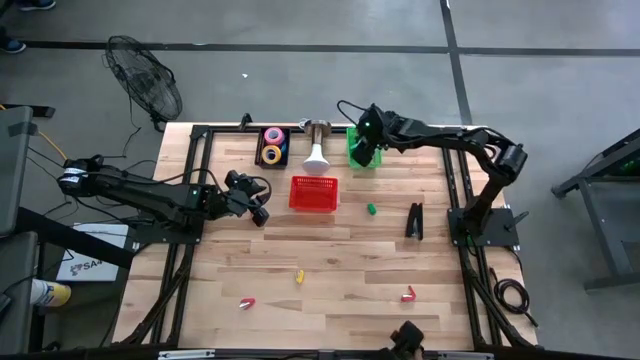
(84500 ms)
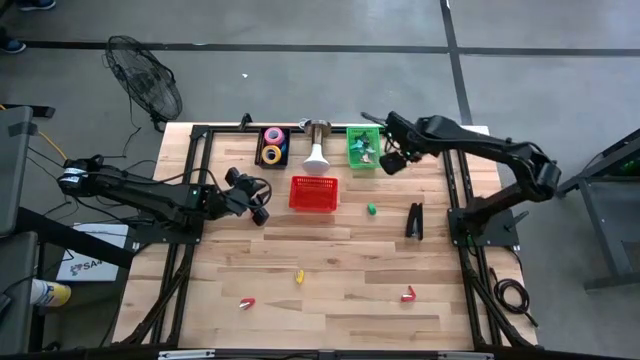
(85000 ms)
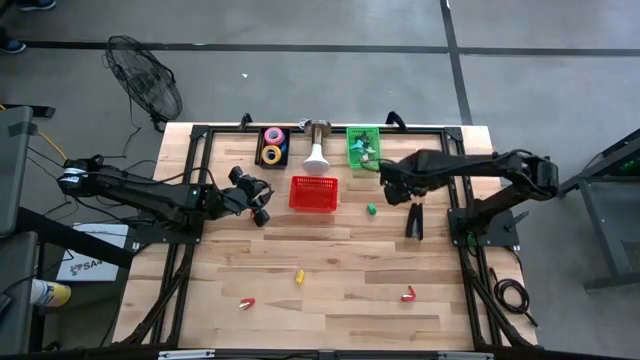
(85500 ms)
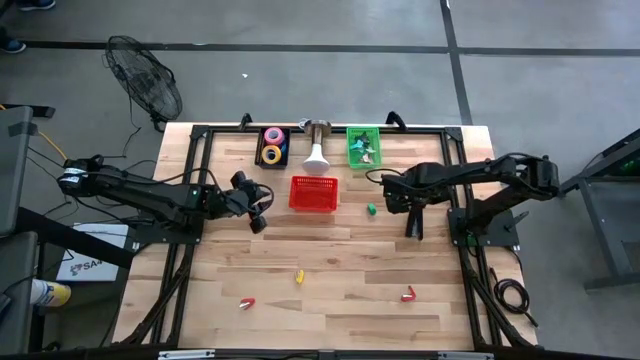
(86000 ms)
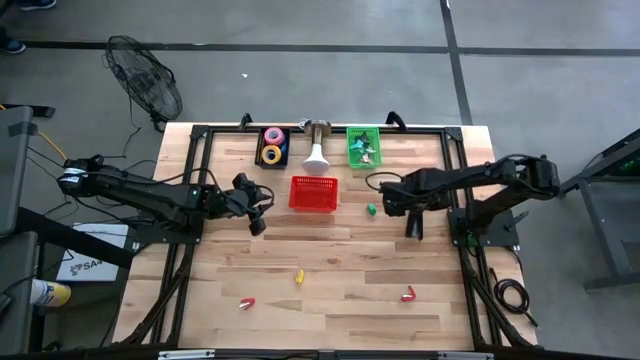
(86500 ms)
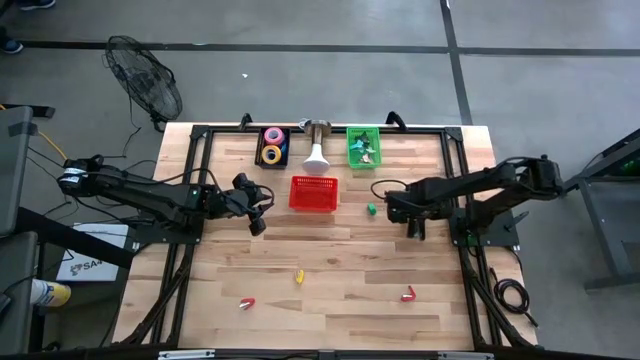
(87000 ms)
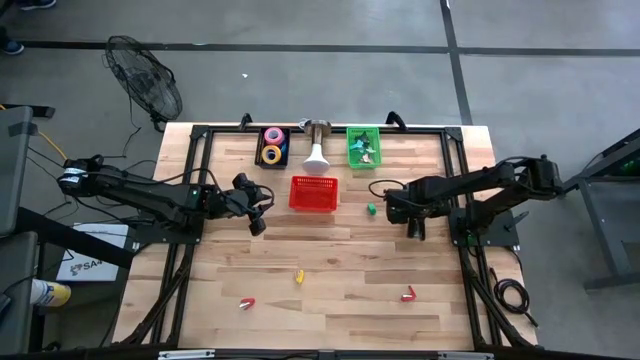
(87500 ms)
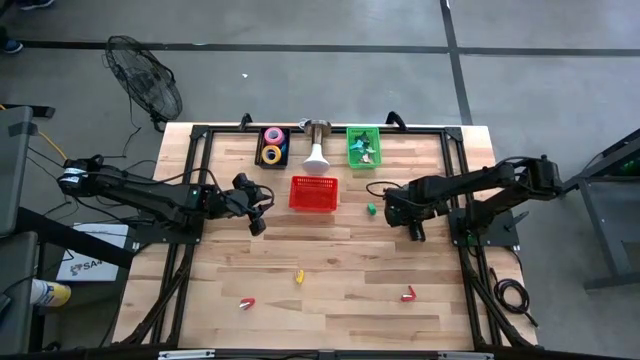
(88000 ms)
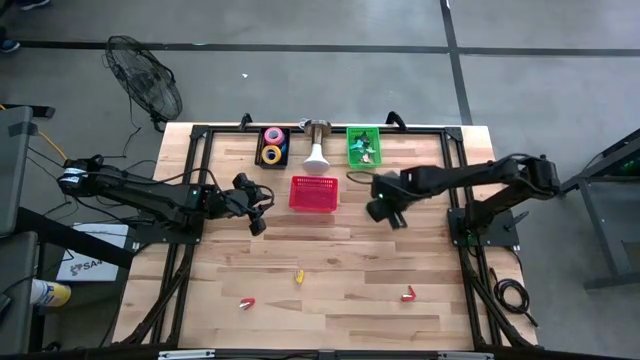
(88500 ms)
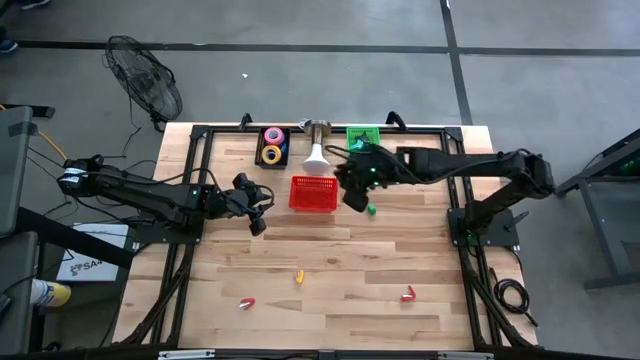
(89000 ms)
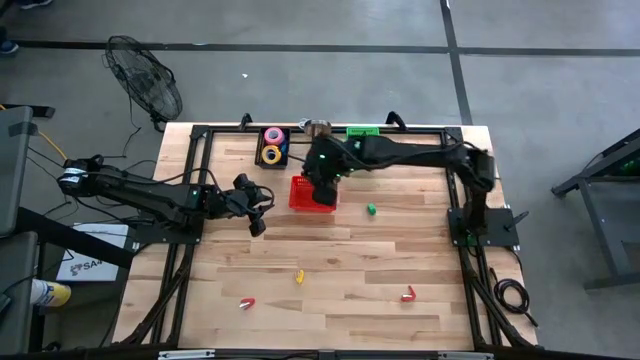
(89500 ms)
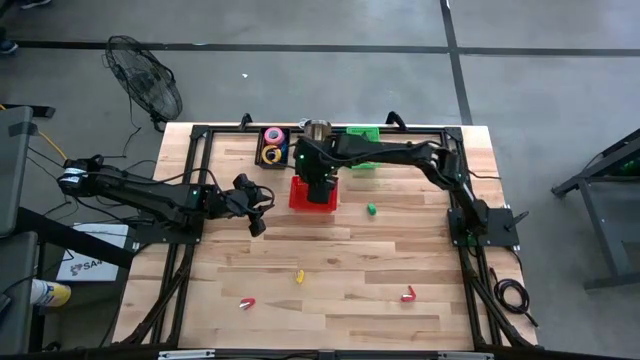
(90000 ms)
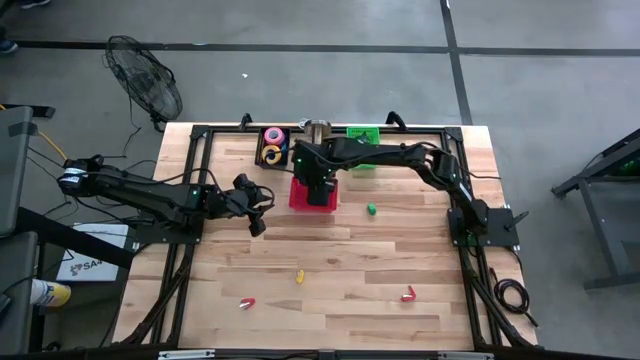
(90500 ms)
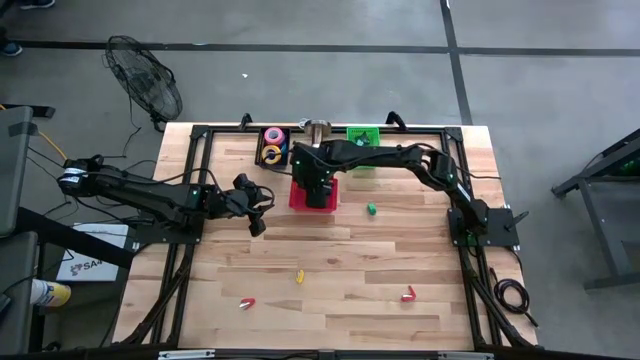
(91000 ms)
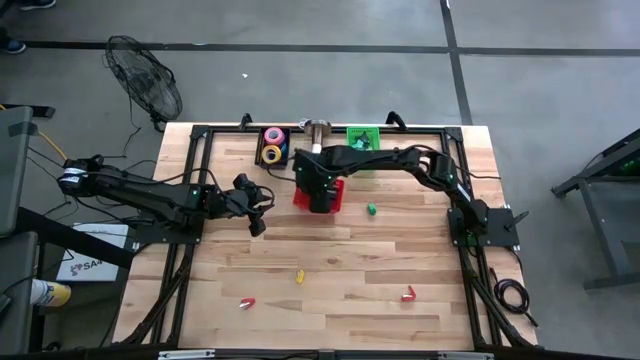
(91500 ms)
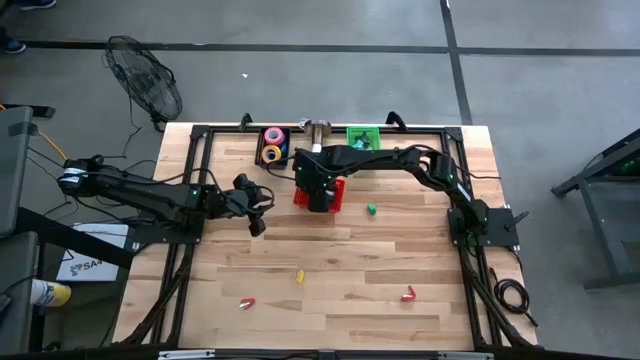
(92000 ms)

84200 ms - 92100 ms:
Task: Pick and place Stapler, Stapler remover, tape
Put the black stapler into the red basket

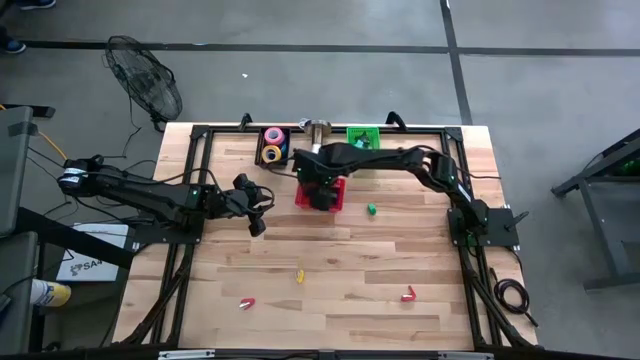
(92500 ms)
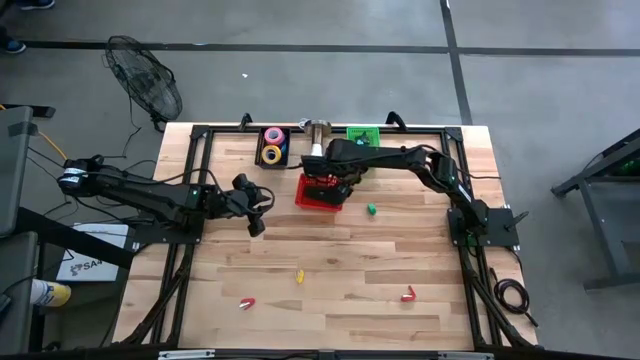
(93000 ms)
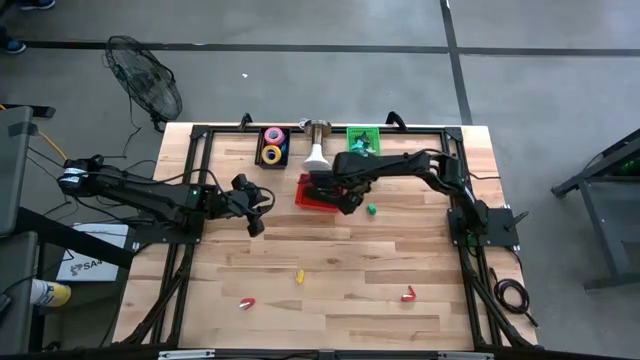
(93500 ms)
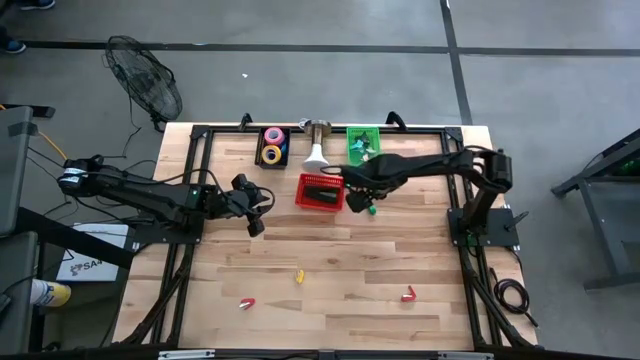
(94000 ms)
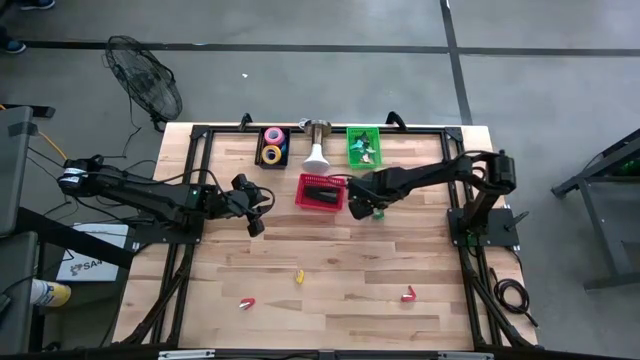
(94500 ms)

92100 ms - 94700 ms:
Put the green stapler into the red basket

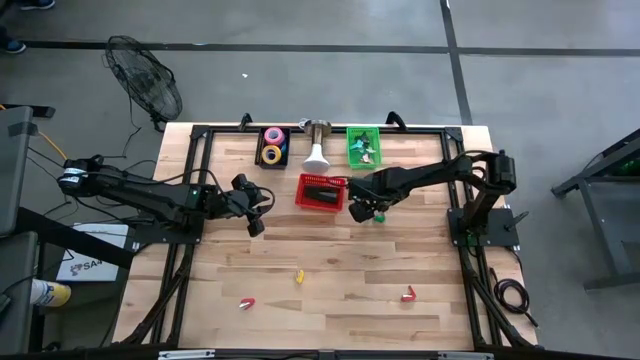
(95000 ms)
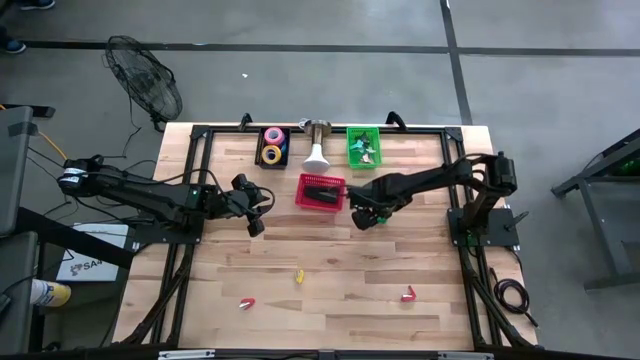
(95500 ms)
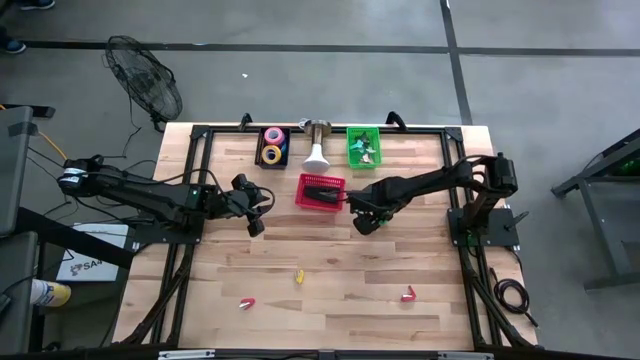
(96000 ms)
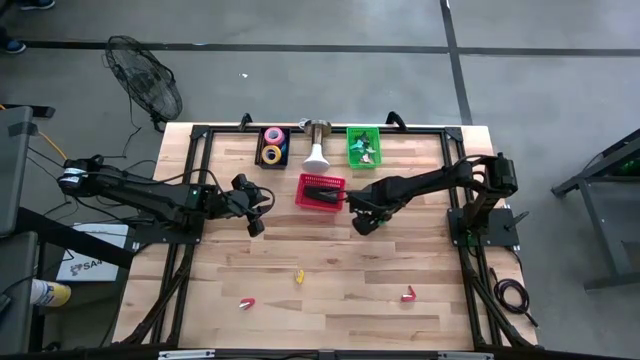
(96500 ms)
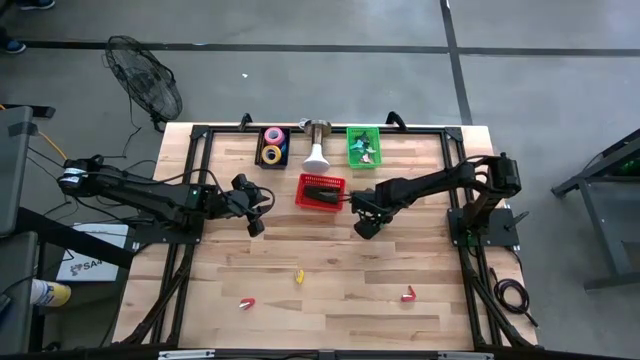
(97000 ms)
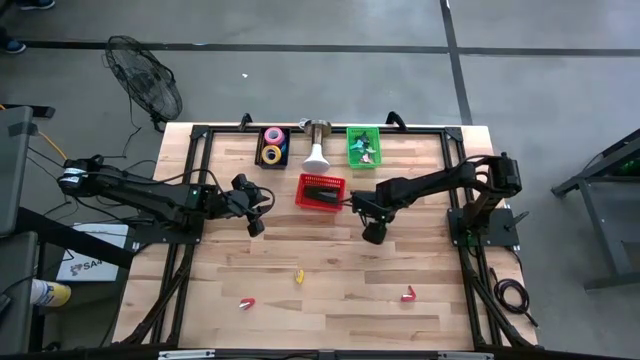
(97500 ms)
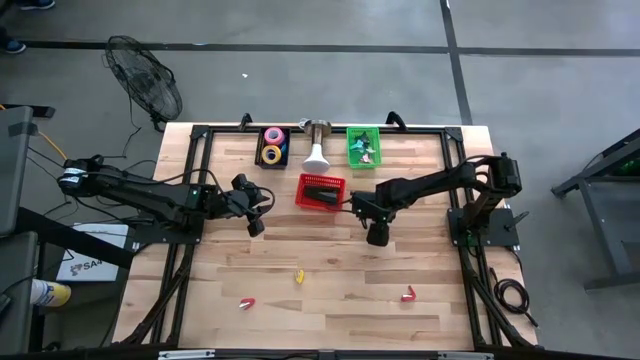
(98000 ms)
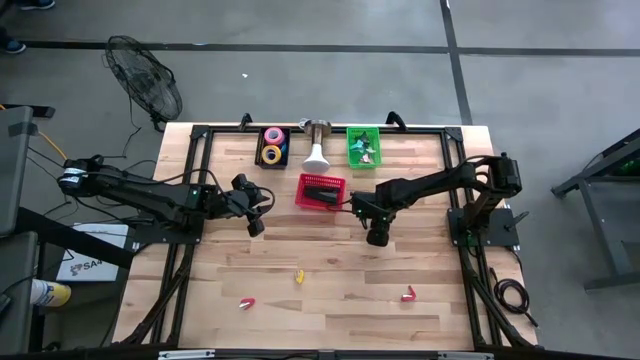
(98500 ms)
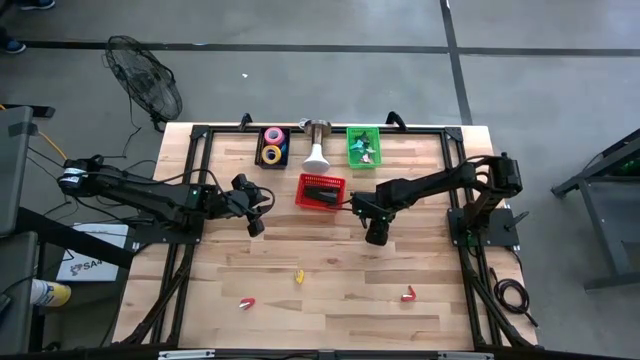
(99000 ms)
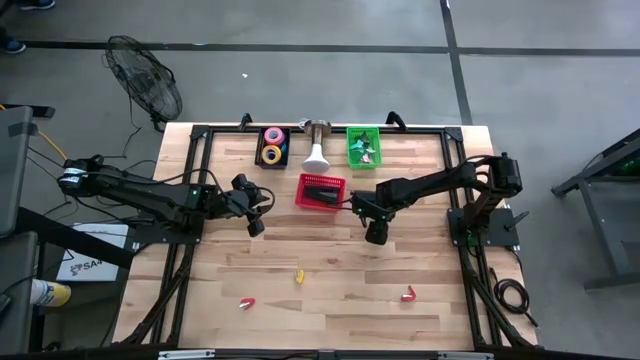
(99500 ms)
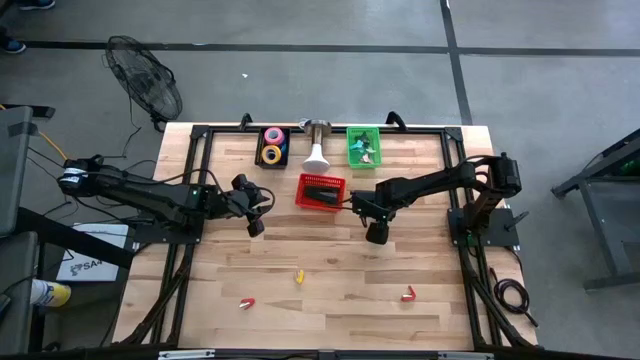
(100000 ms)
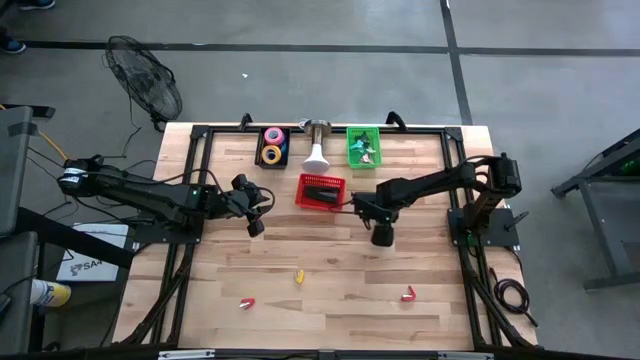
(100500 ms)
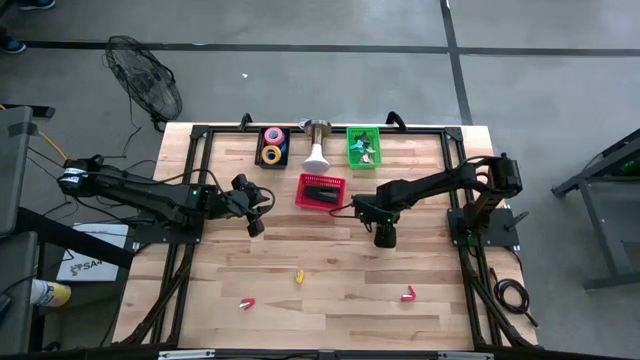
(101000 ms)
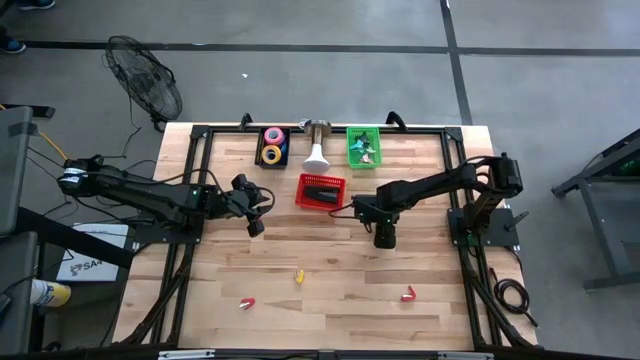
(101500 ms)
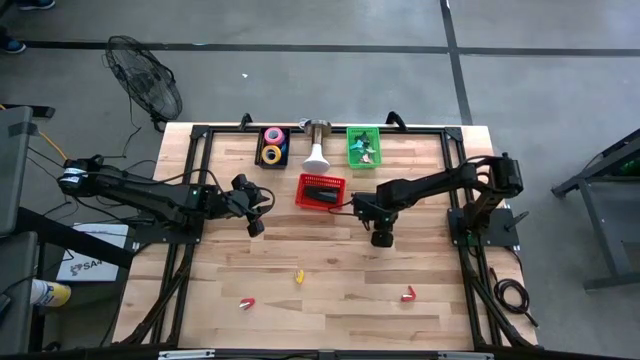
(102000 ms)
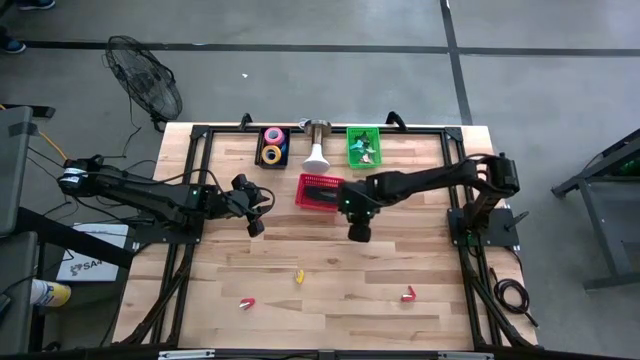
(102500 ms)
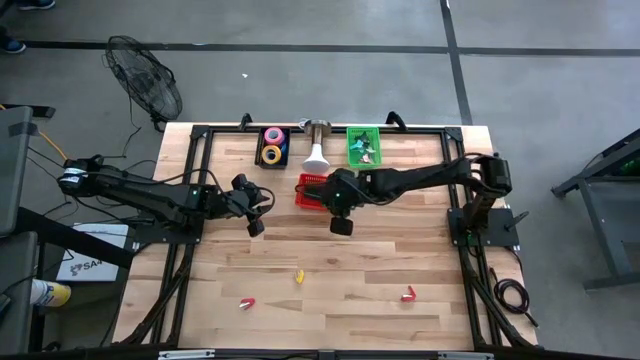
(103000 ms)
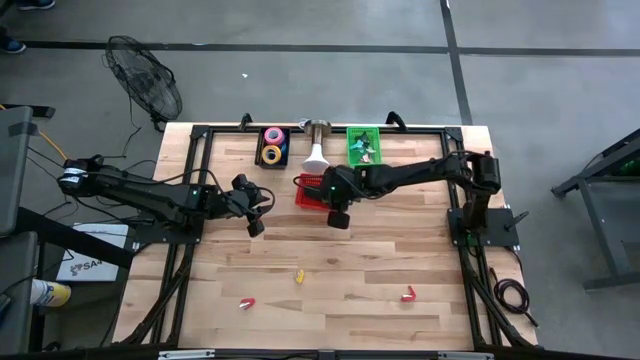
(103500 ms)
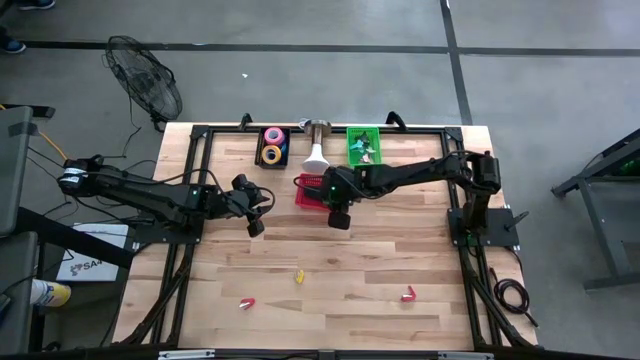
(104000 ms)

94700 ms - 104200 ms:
Put the green stapler into the red basket

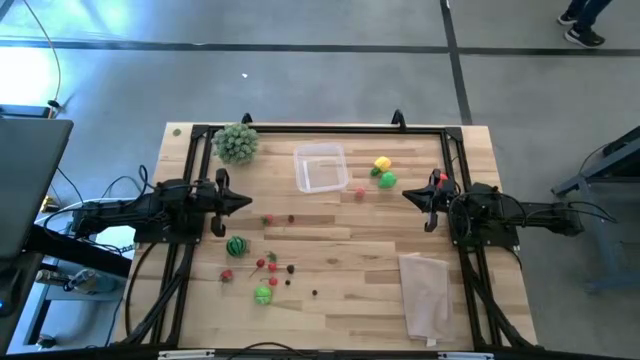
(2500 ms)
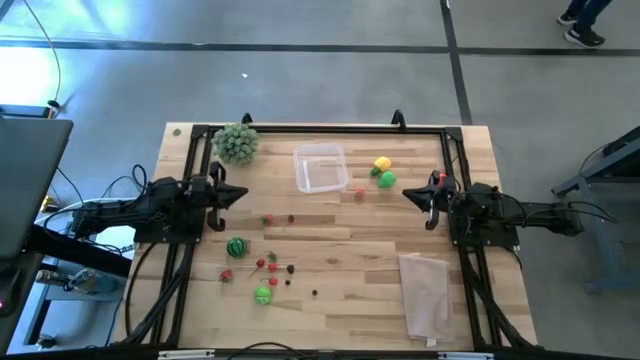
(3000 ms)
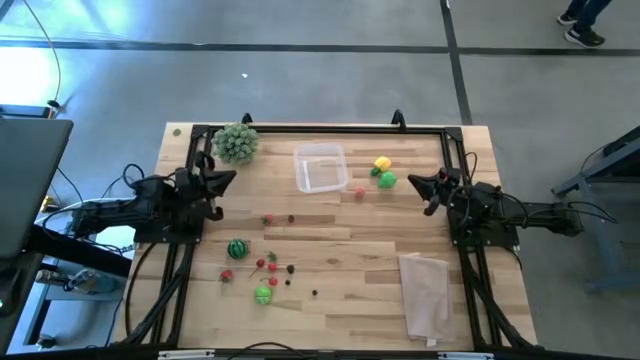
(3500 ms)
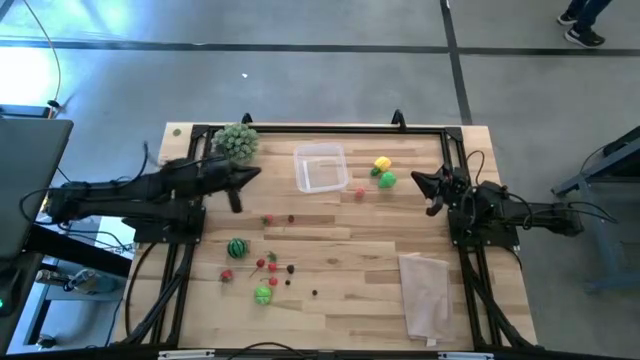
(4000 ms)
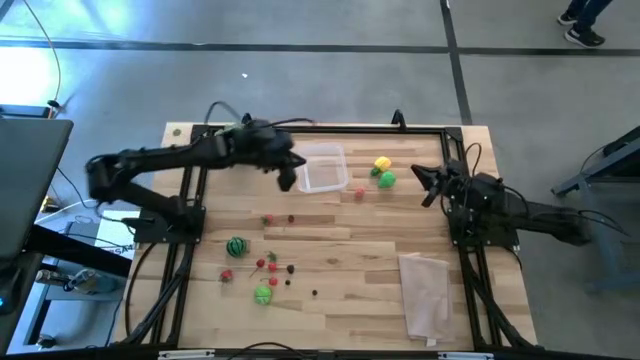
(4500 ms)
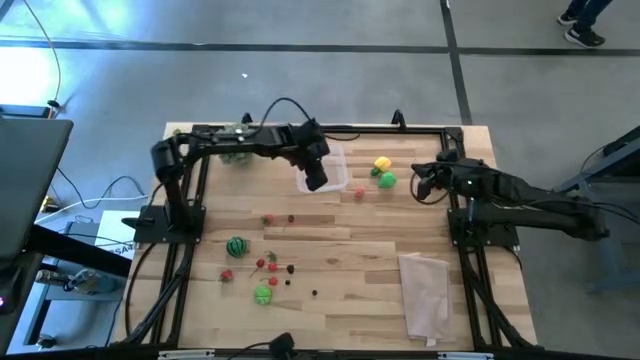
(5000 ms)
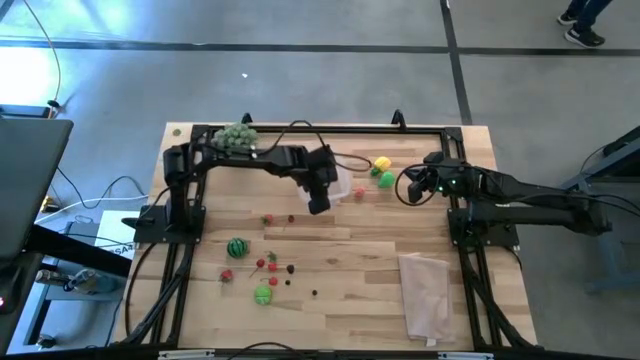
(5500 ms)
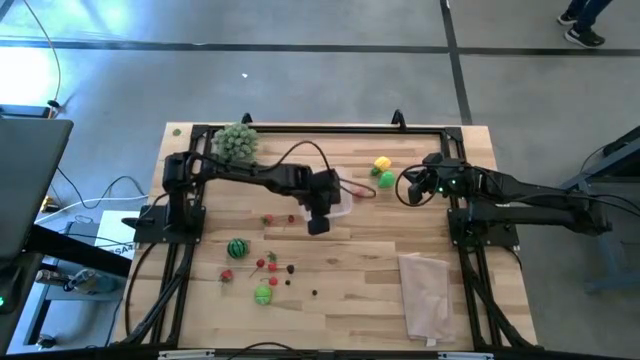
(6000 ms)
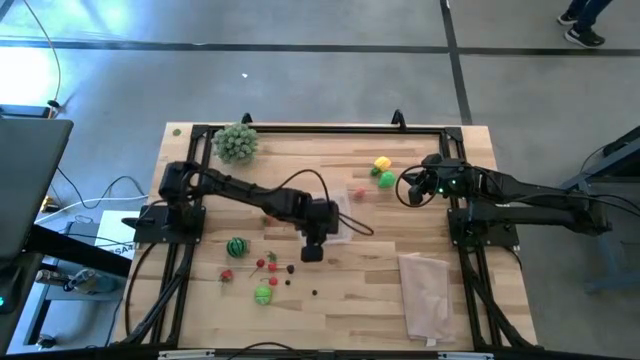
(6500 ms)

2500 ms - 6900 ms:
Task: Pick and placing Produce into tupperware
Move the transparent bin to the center of the table
